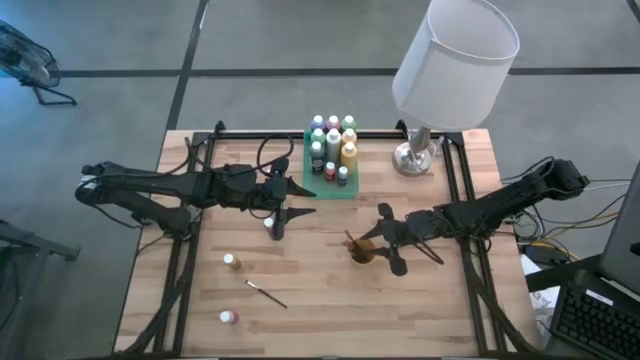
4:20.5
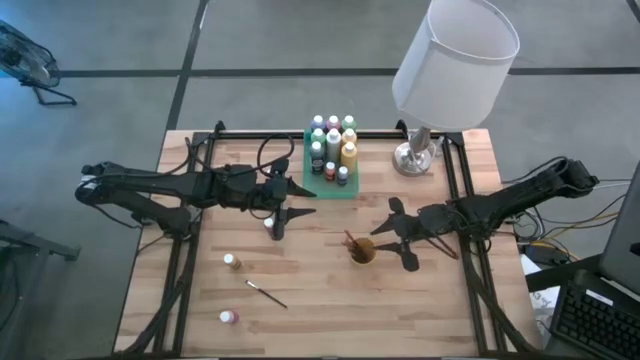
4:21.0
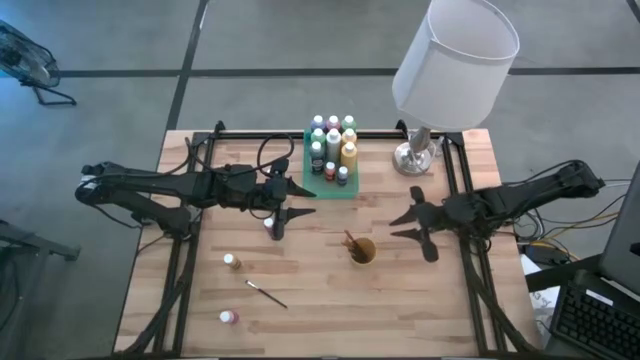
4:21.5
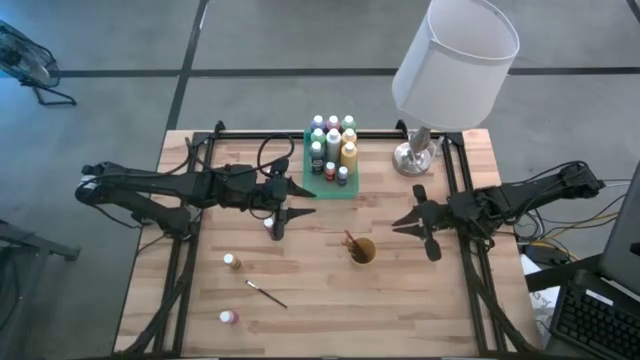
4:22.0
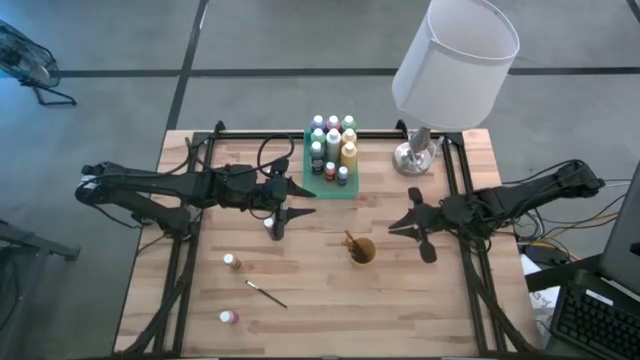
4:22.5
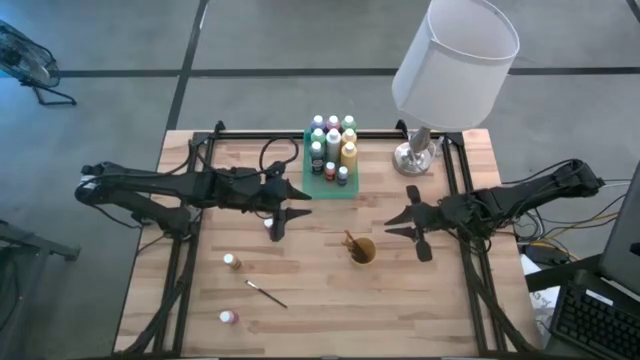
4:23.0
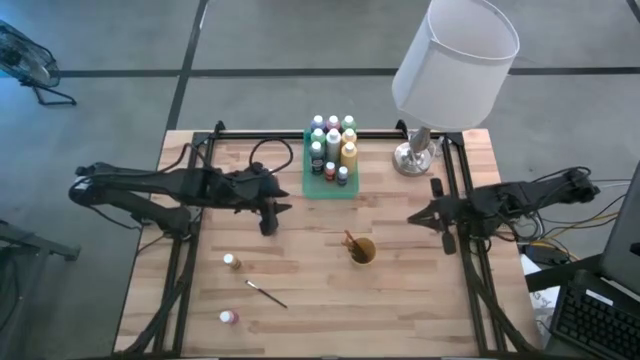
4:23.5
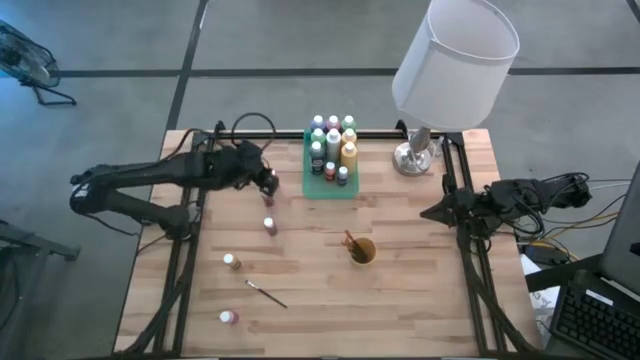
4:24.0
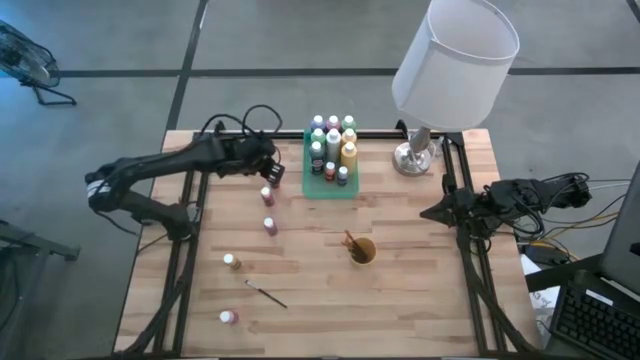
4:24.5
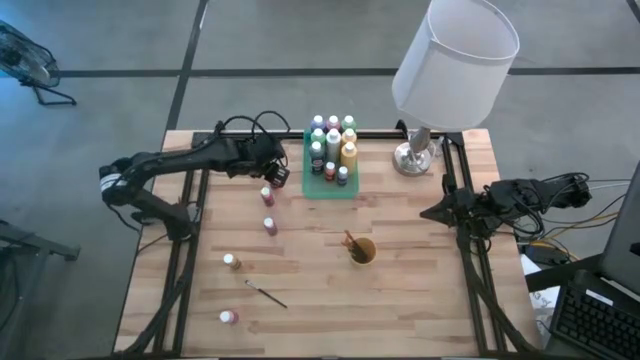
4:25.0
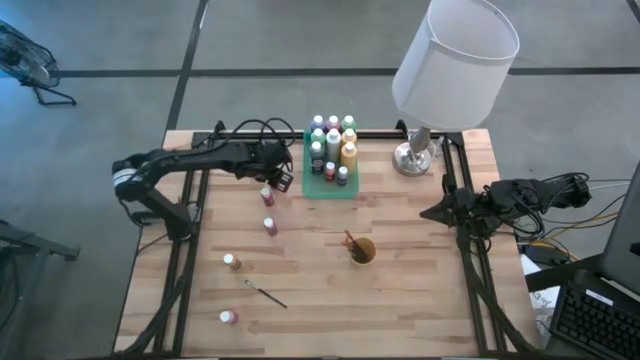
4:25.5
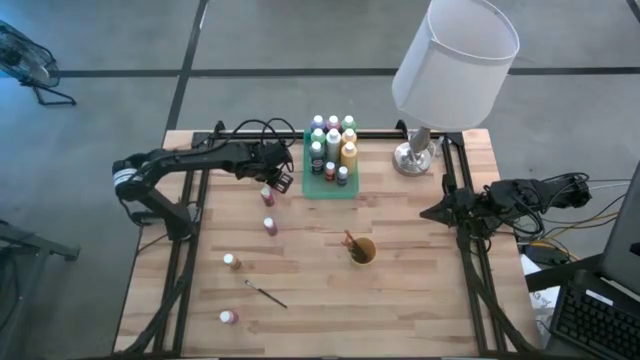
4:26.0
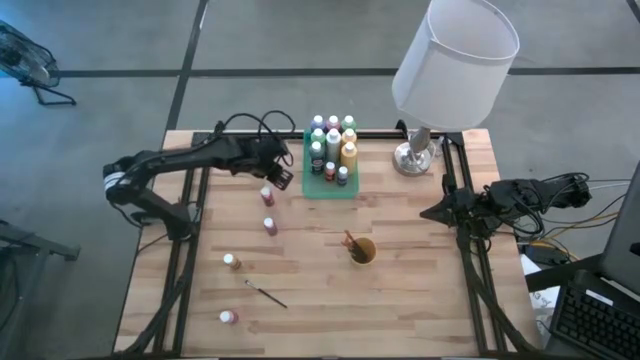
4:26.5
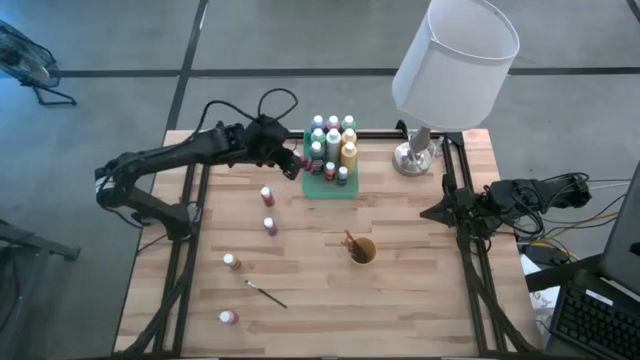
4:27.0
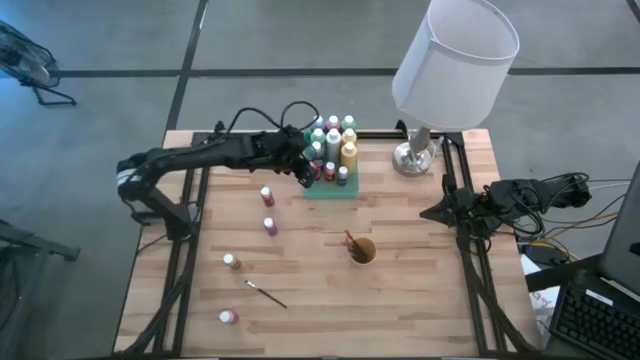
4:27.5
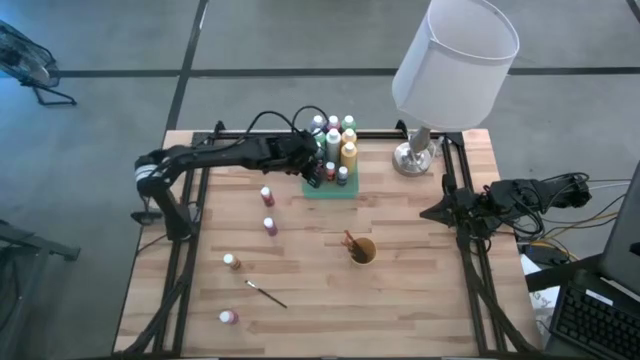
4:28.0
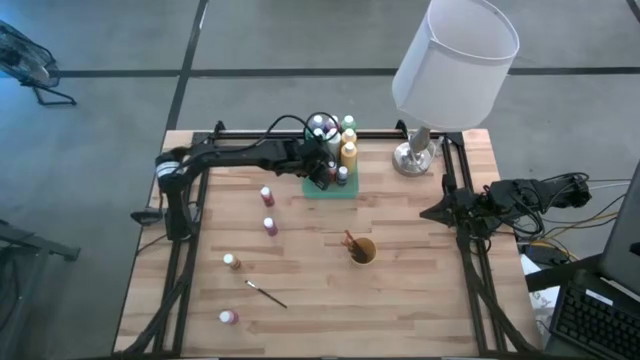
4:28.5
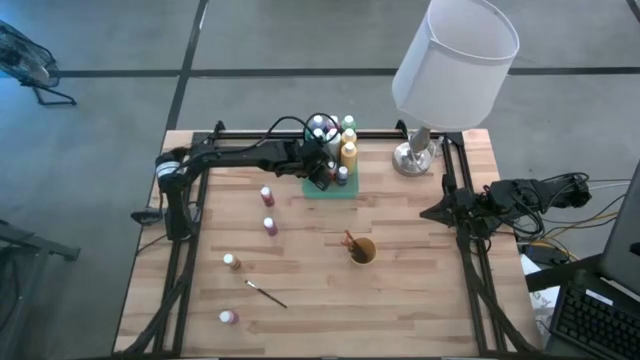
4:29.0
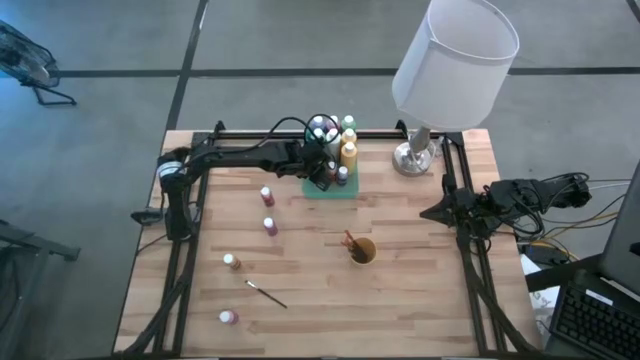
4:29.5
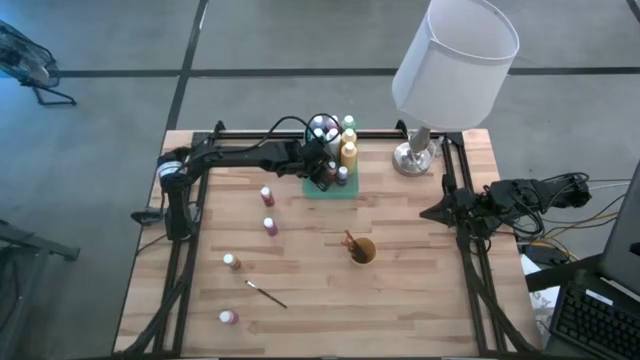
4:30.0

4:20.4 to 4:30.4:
Task: Pick & Place Paint Supplies
Put the red paint bottle into the green bin

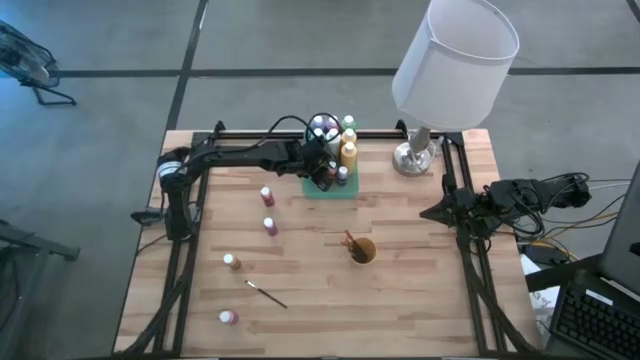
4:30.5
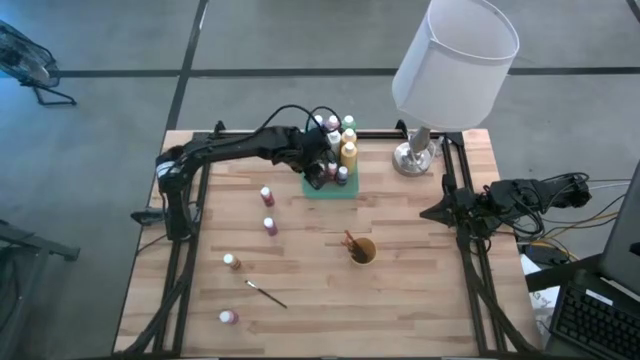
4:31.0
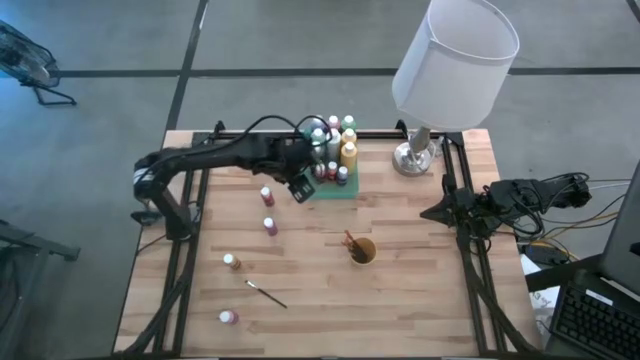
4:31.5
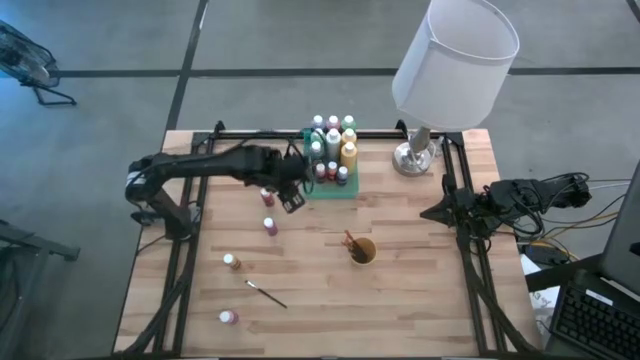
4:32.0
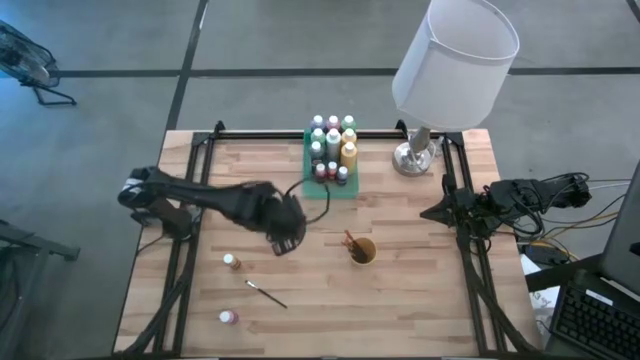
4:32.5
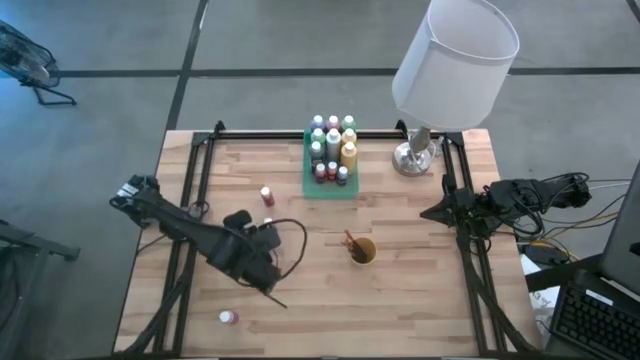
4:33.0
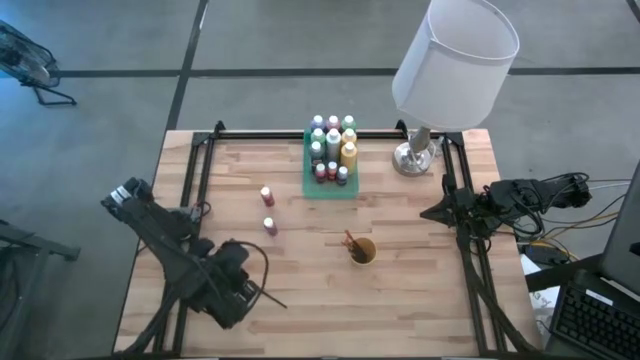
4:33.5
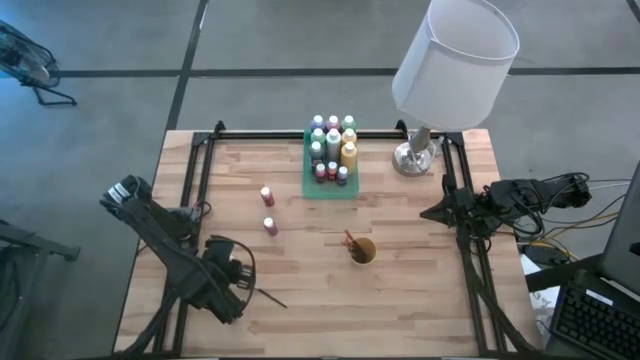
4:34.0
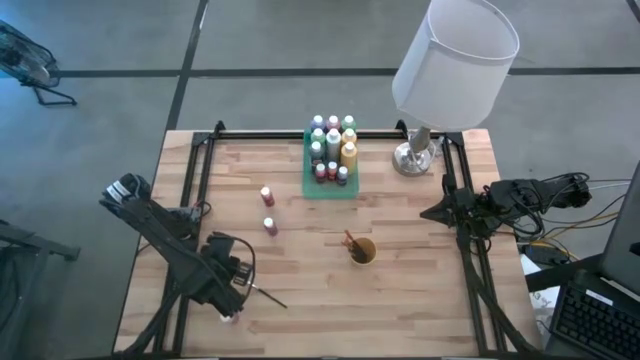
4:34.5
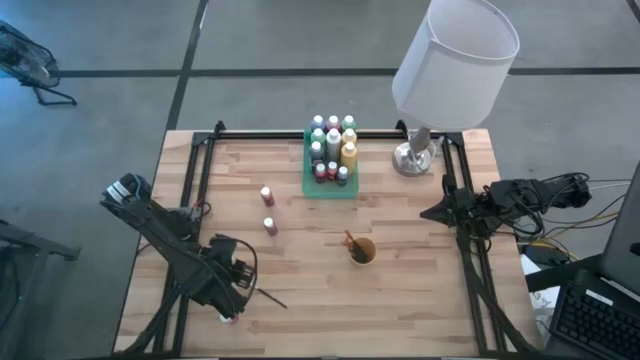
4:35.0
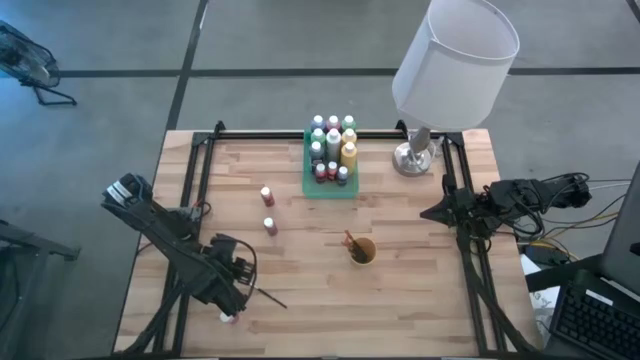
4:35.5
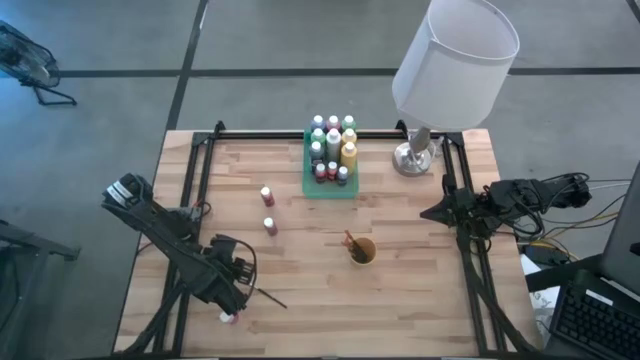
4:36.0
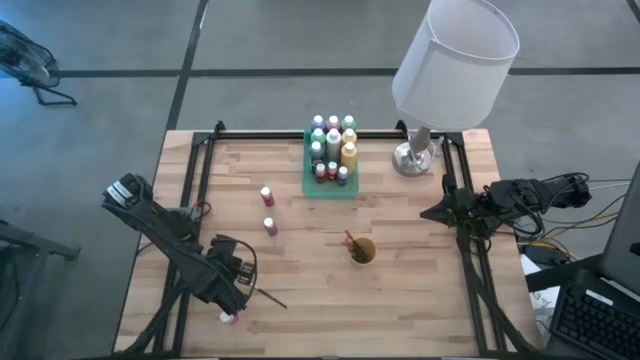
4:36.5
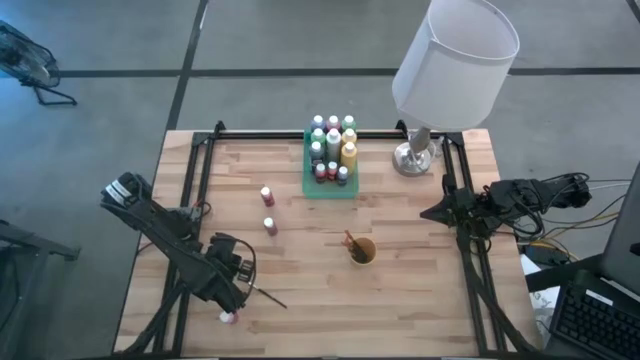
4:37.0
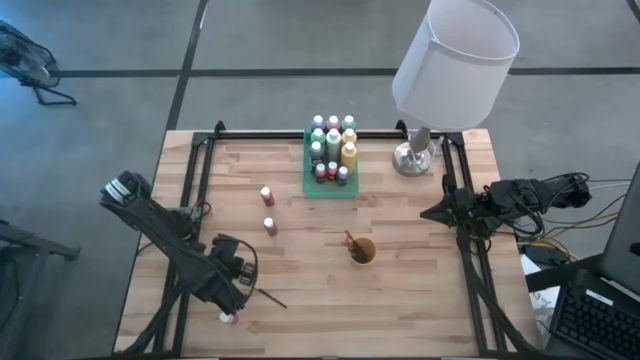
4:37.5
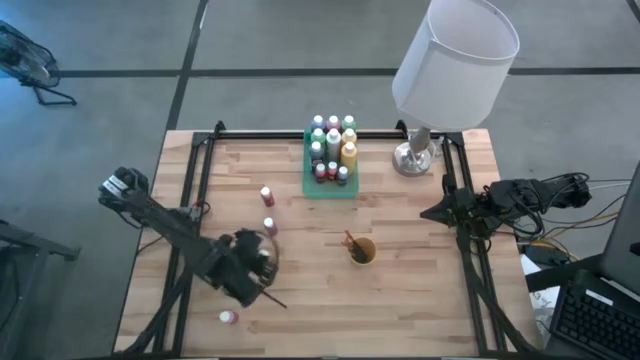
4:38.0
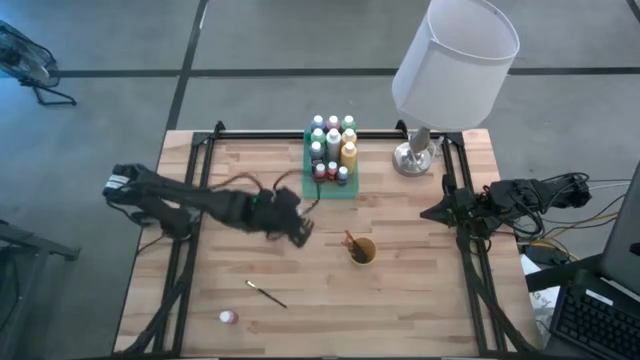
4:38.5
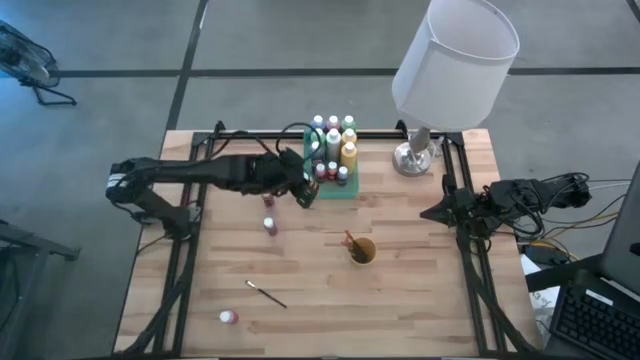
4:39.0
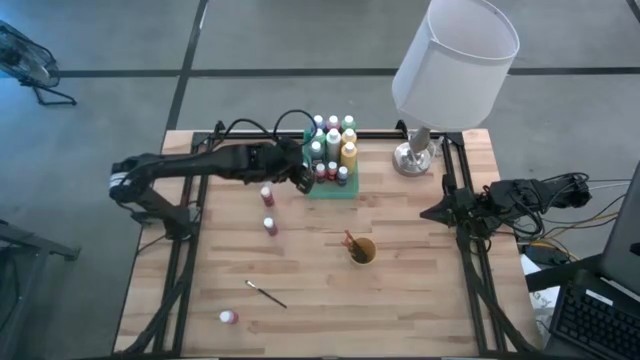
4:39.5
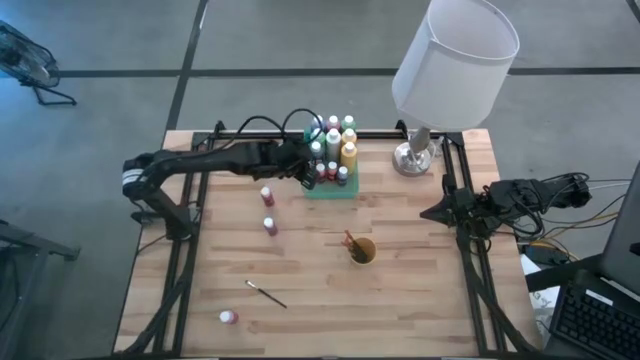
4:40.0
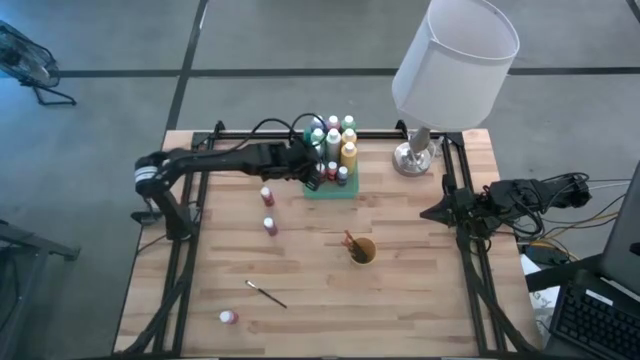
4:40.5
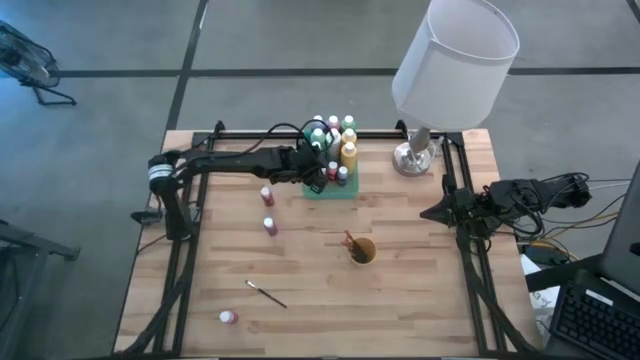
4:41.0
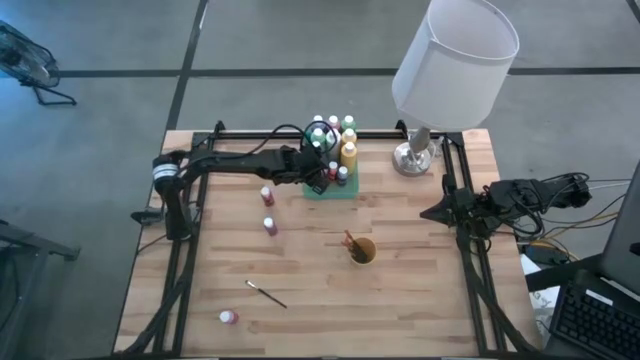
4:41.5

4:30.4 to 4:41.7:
Put the dark yellow paint bottle into the green bin
